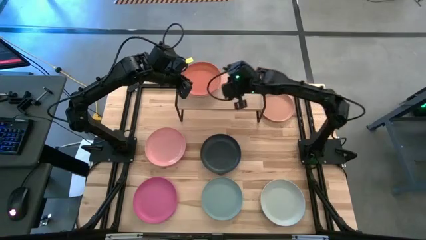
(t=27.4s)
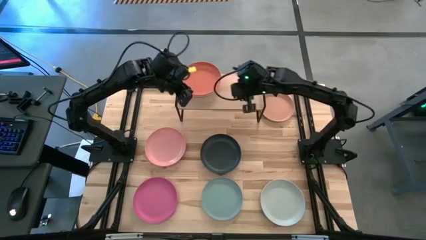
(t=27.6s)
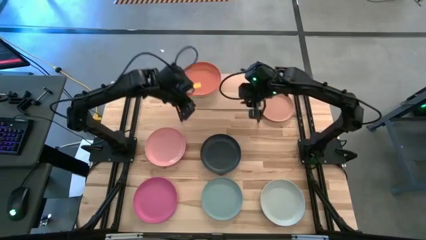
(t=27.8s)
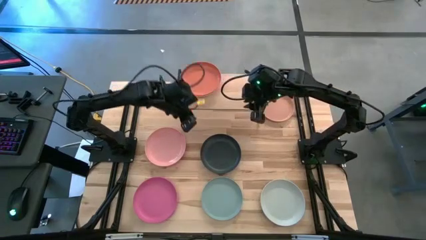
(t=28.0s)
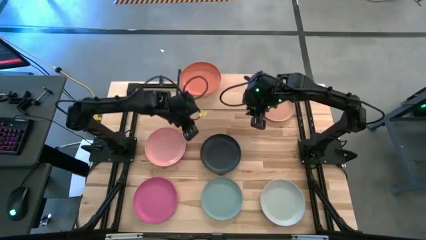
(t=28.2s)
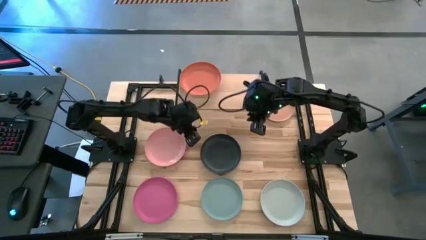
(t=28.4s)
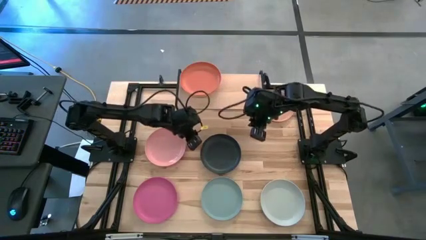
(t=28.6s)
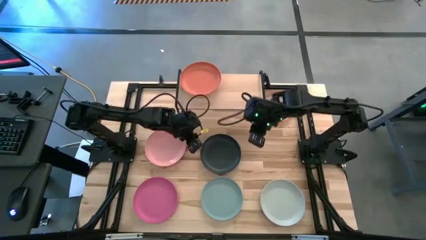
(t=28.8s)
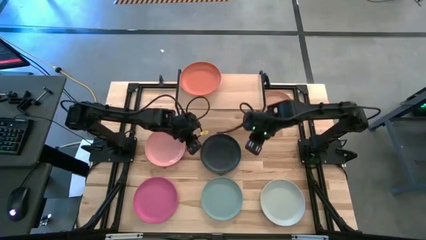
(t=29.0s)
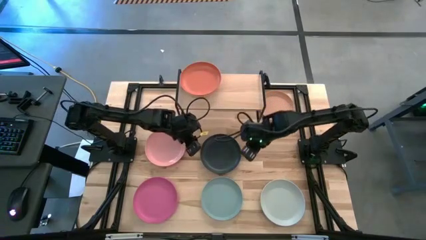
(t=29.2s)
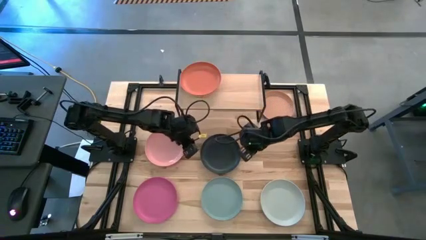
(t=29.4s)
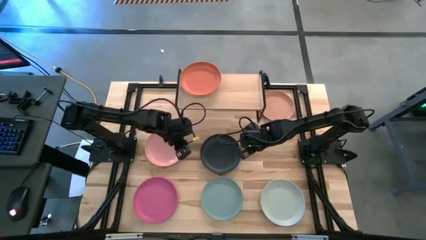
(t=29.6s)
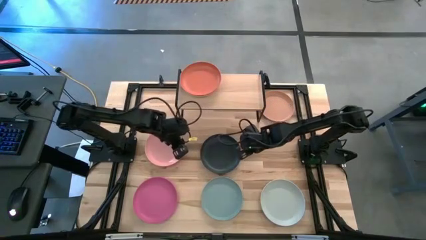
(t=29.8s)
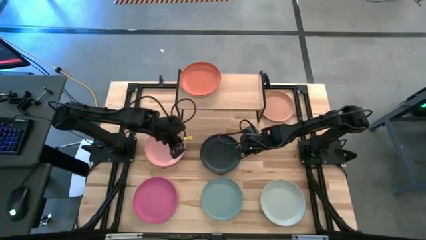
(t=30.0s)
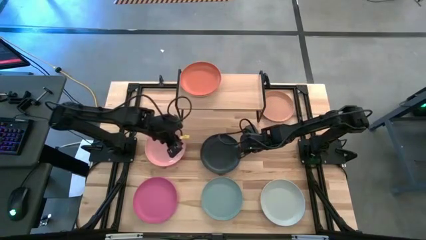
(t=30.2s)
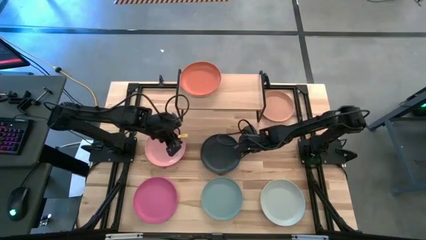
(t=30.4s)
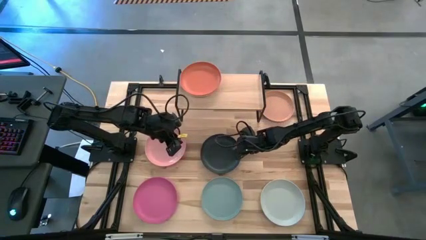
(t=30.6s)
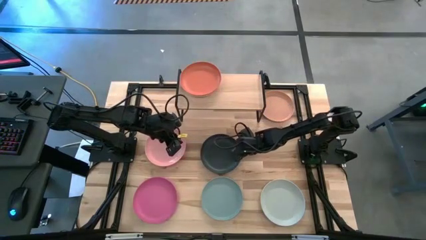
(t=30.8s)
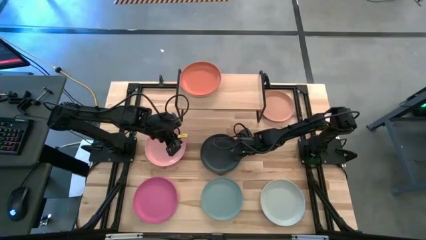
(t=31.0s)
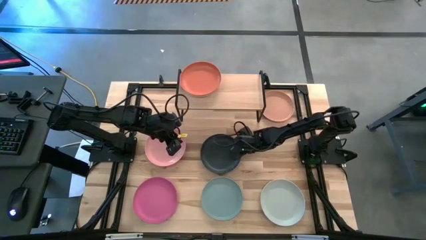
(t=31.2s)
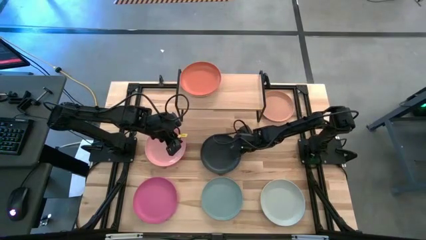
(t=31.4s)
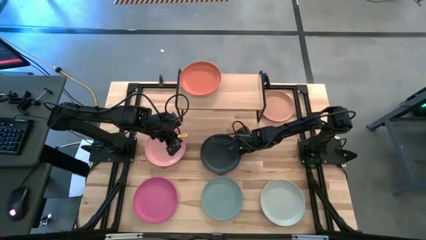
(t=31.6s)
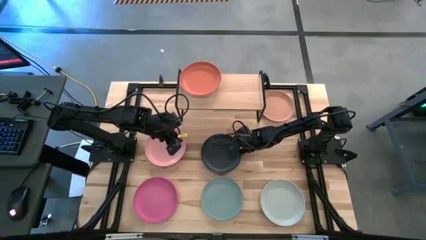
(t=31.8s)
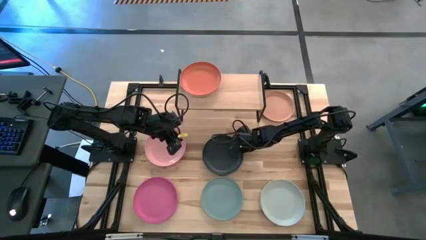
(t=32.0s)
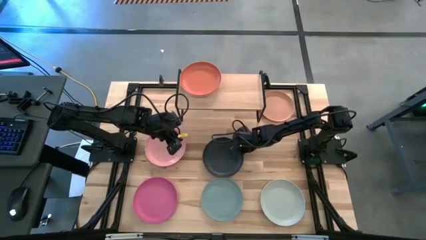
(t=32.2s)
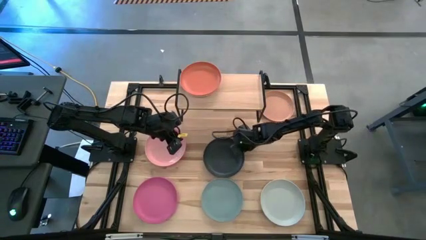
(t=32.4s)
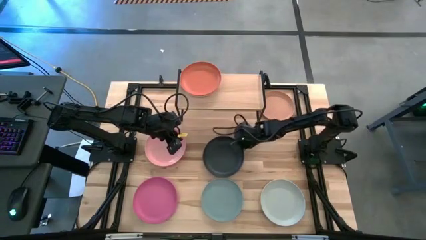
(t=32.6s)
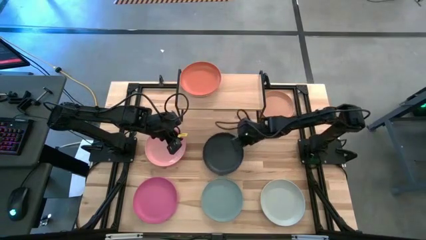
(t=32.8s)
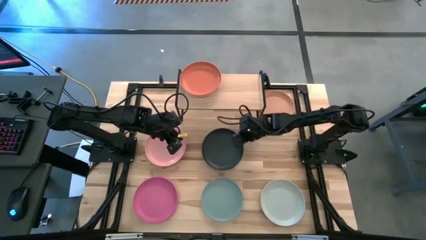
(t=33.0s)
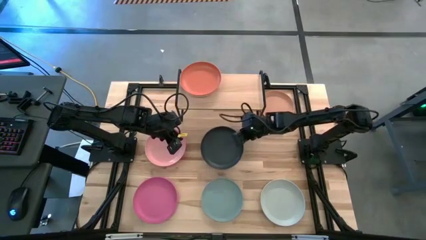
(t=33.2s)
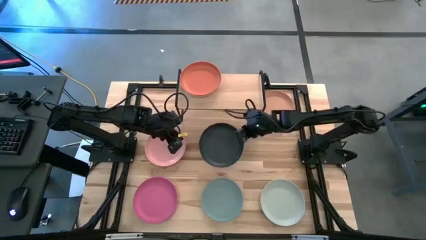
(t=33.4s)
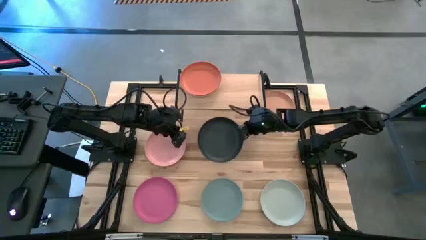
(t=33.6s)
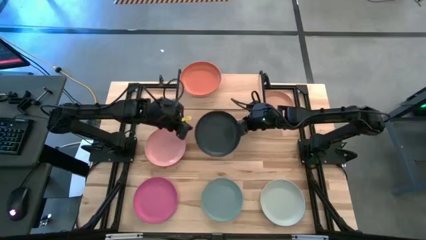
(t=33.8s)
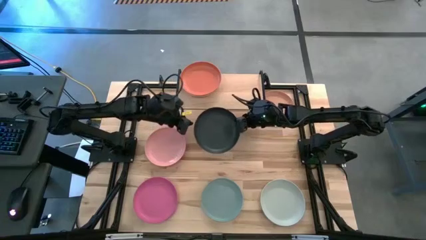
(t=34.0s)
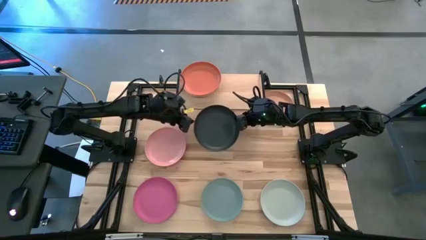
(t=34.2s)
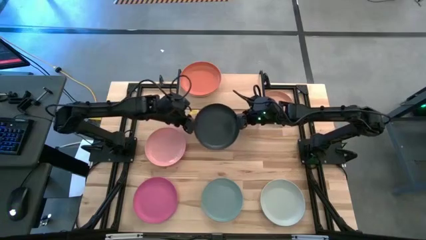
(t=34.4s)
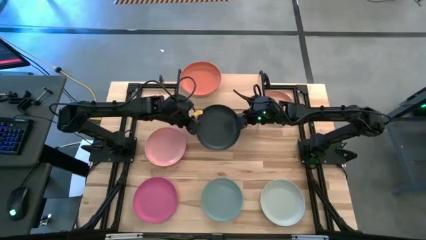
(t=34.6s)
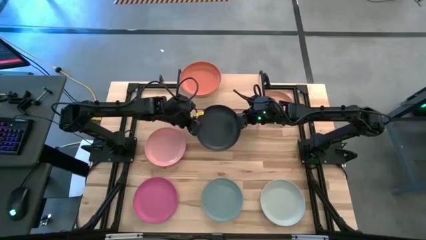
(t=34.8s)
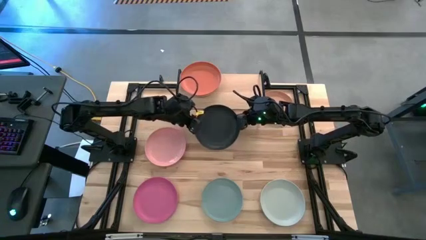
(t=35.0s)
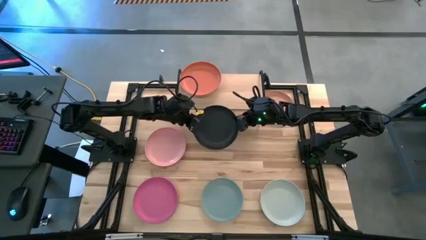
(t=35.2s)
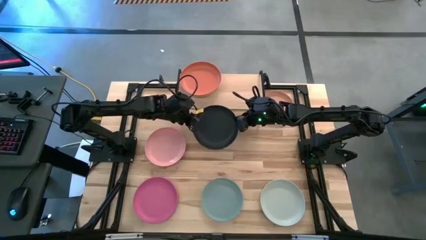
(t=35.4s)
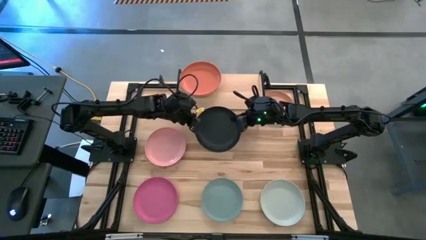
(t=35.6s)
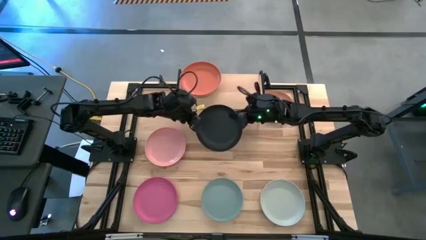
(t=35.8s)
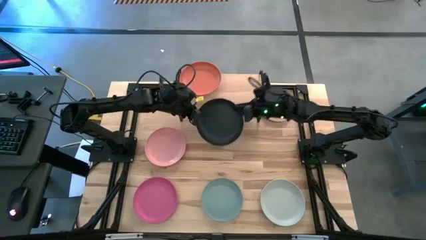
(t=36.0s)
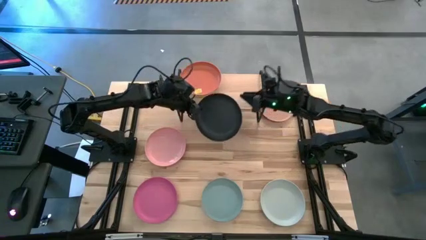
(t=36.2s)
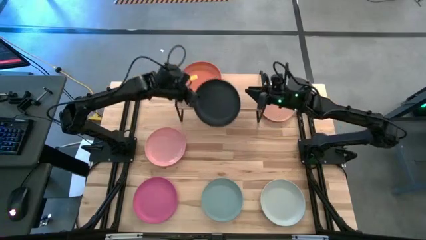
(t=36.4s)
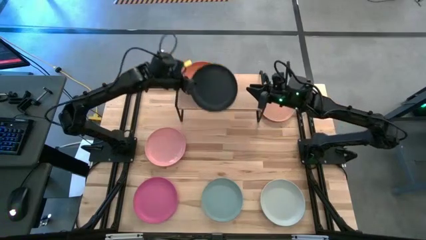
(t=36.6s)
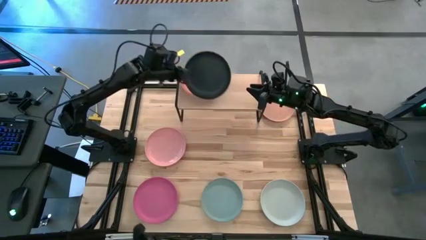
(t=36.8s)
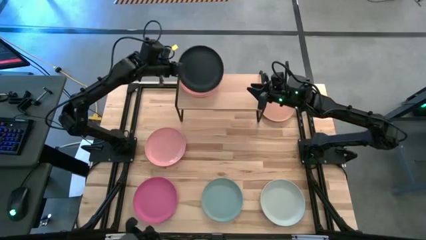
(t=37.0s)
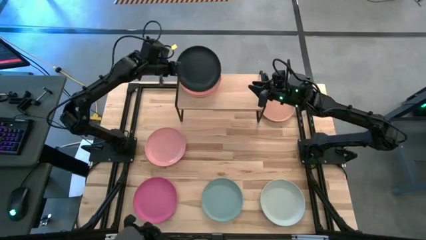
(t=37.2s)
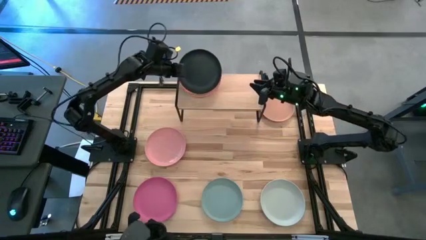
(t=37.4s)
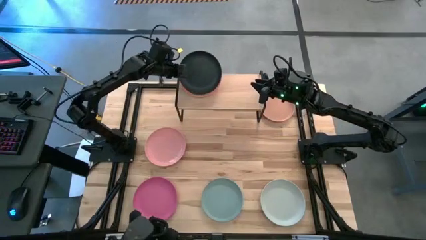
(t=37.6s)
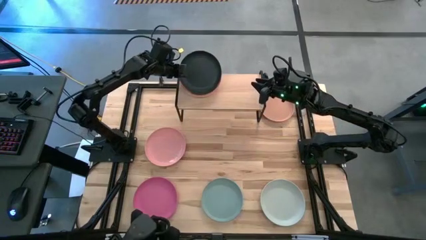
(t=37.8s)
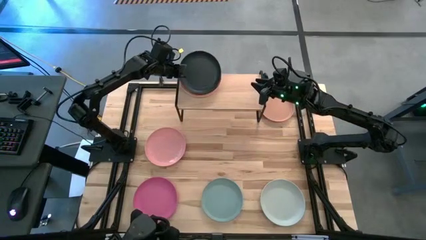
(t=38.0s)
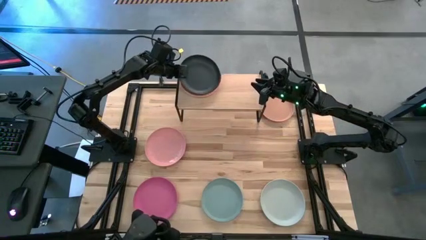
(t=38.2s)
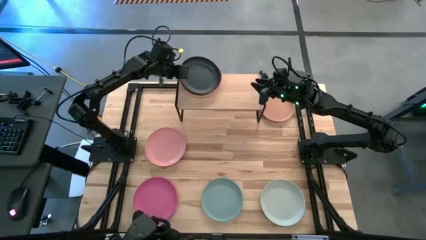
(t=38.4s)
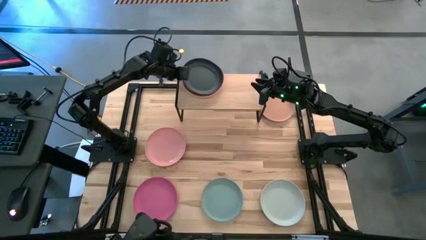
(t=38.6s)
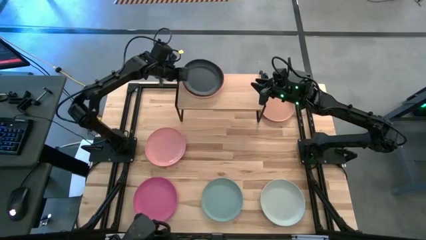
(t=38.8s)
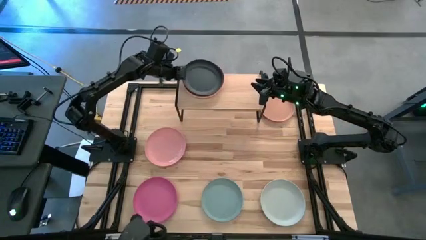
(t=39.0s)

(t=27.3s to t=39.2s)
Task: Place and stack plates onto a shelf
Stack the black plate on top of the orange plate on the shelf

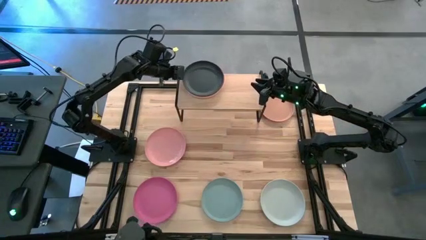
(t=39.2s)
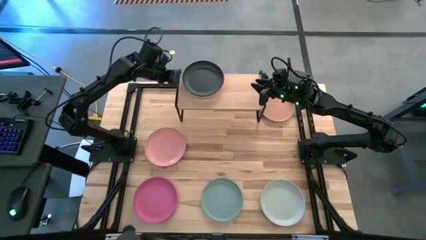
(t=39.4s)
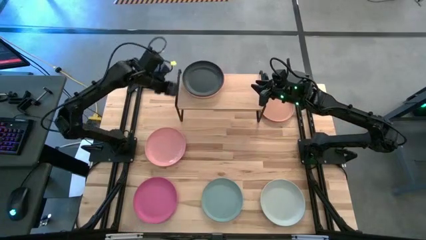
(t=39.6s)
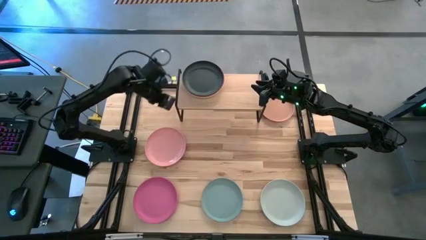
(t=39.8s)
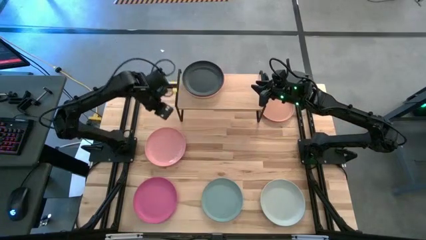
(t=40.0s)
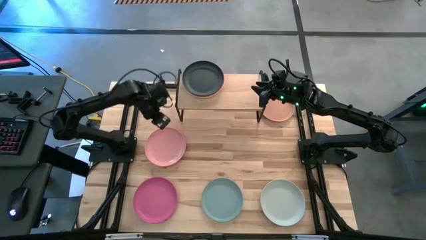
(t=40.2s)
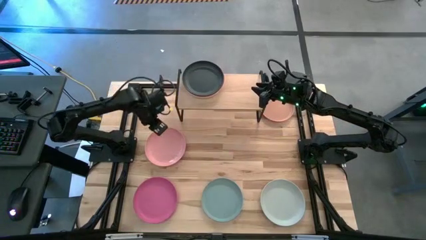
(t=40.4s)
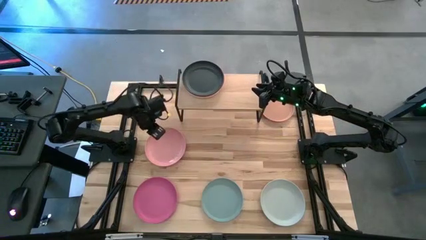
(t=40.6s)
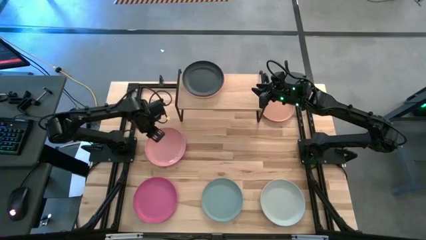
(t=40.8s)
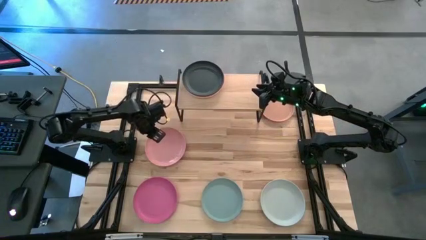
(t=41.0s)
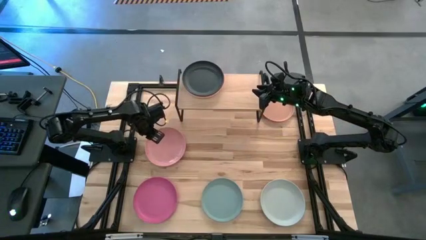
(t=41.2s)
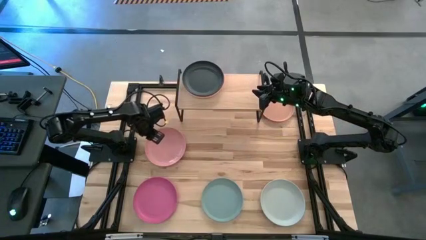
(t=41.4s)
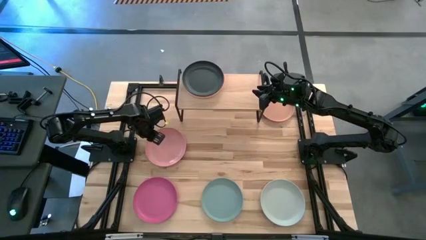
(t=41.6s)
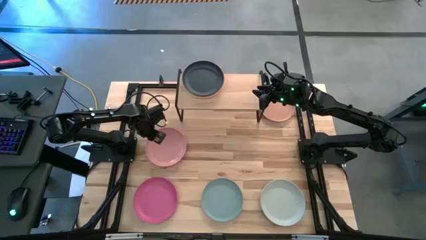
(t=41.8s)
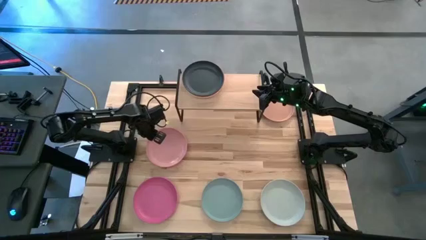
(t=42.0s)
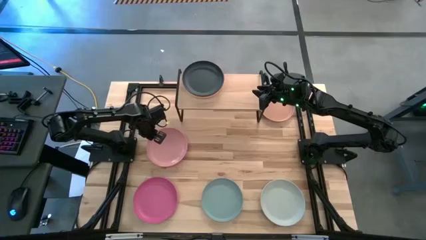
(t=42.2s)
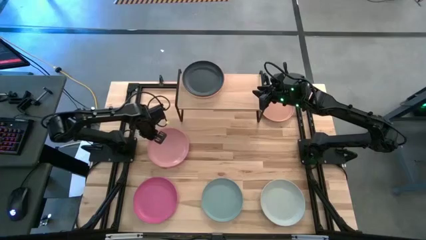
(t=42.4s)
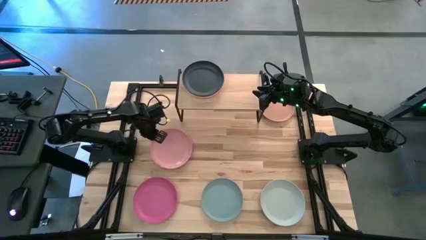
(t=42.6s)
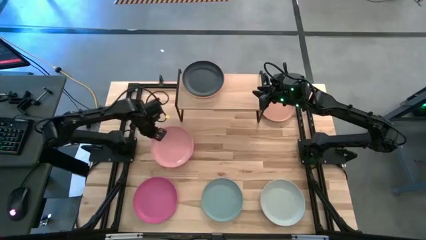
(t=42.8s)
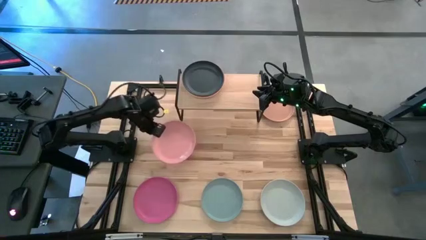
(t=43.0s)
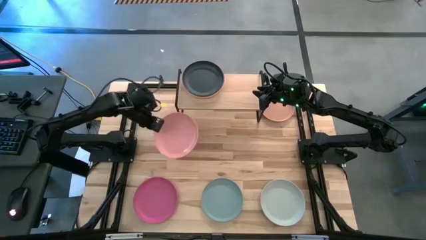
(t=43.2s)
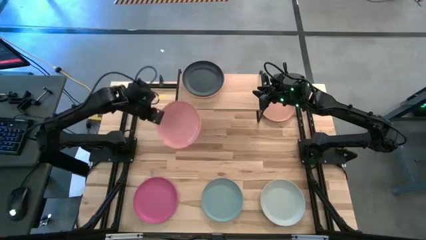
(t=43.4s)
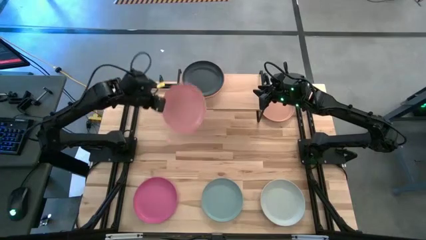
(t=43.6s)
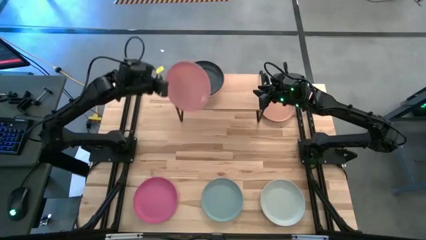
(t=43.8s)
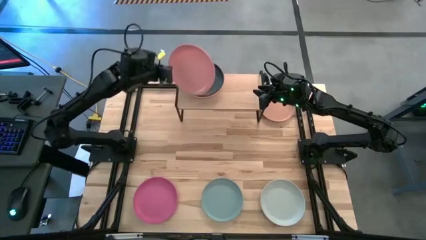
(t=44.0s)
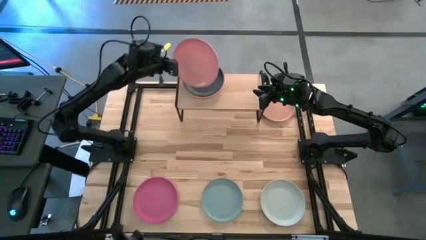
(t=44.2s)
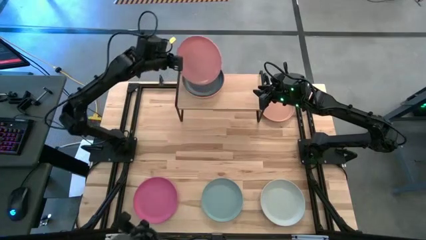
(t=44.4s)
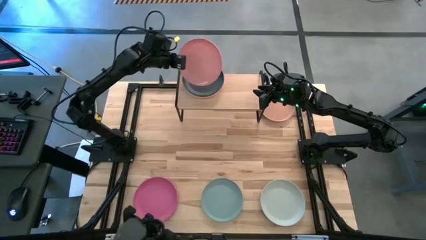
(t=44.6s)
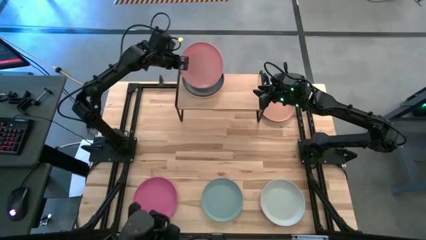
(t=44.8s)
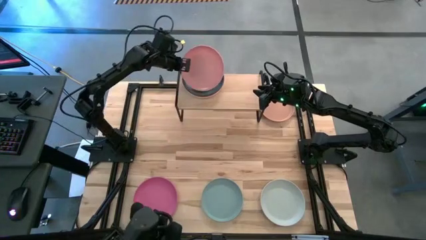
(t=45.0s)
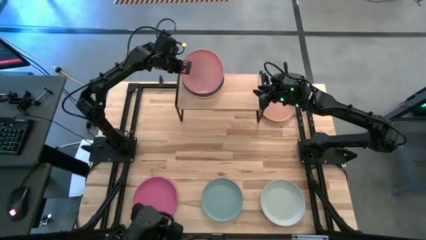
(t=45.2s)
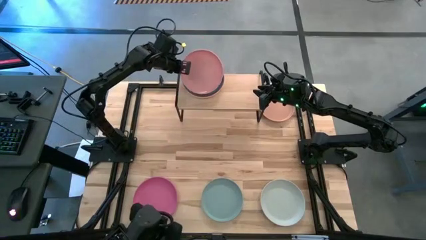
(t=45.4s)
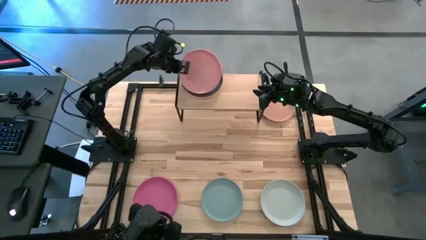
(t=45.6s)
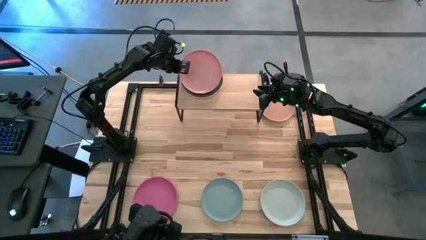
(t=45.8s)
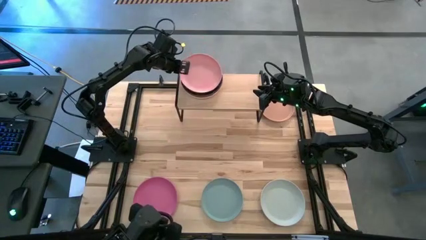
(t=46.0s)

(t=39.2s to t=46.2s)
Stack the light pink plate on top of the black plate on the shelf
